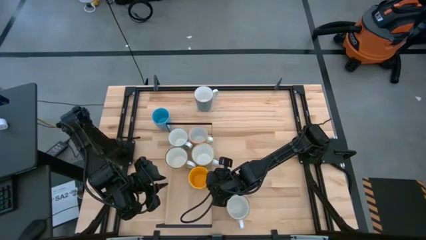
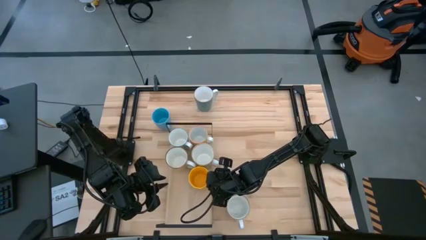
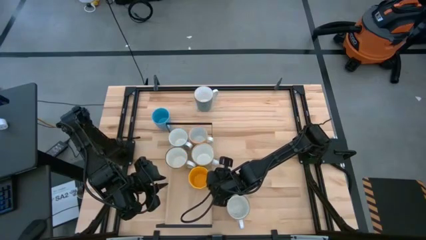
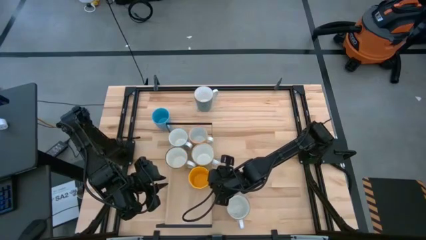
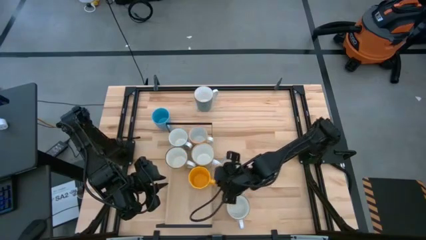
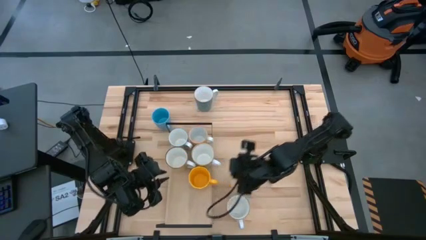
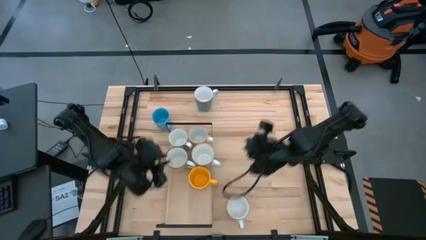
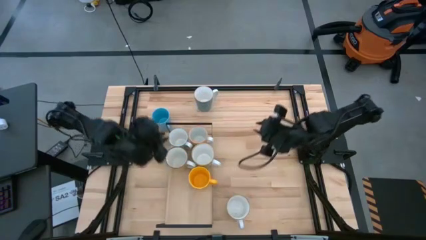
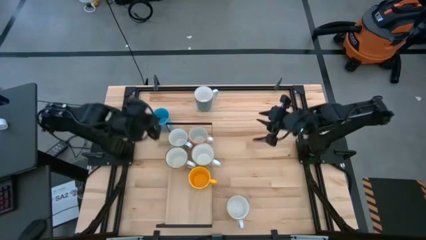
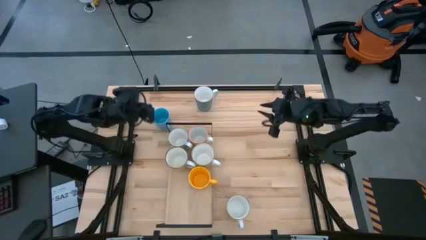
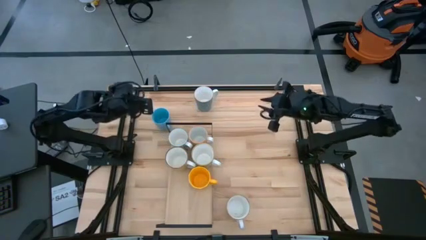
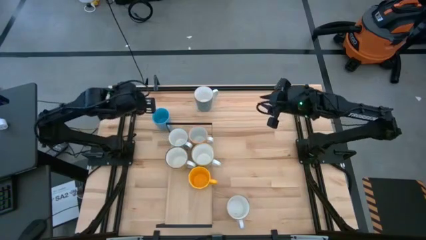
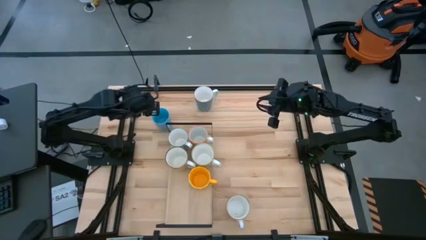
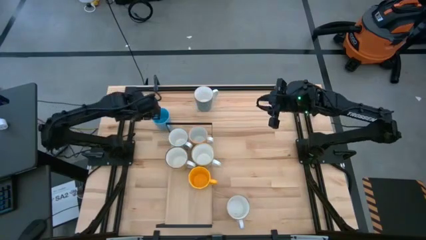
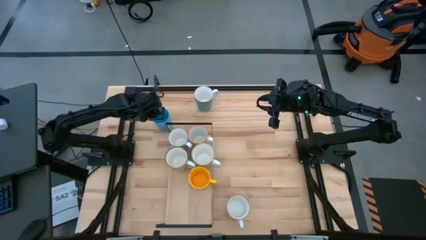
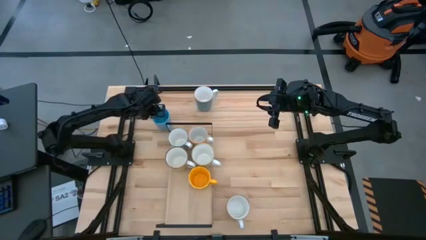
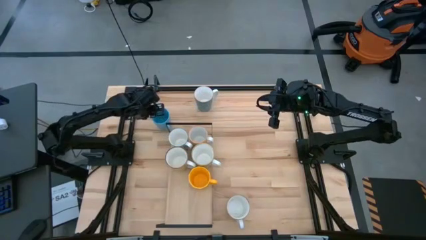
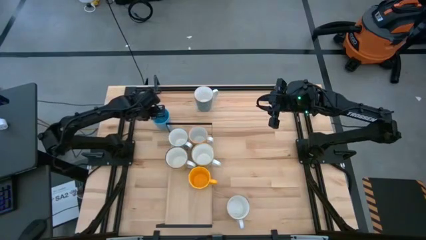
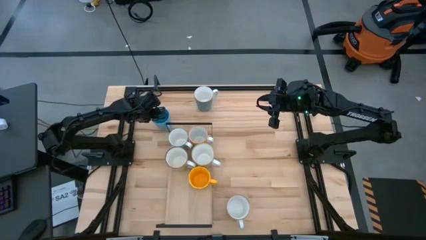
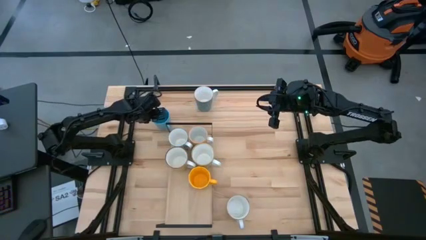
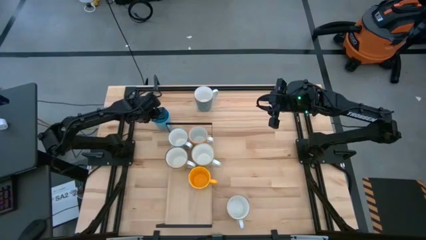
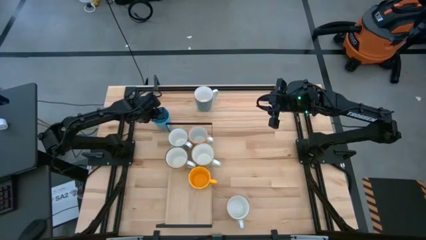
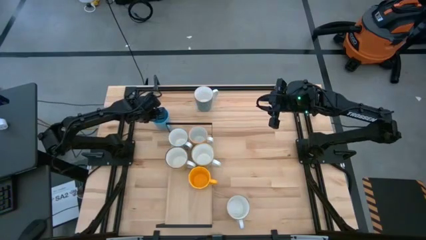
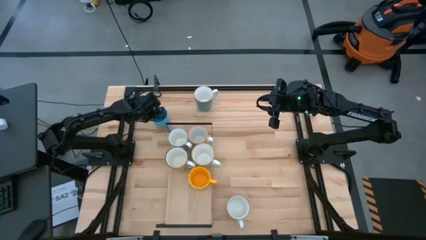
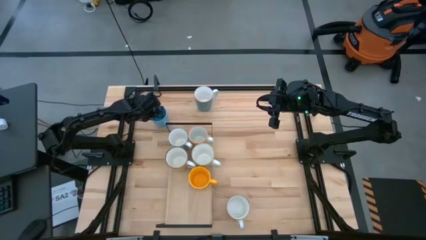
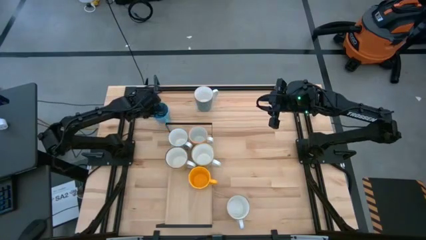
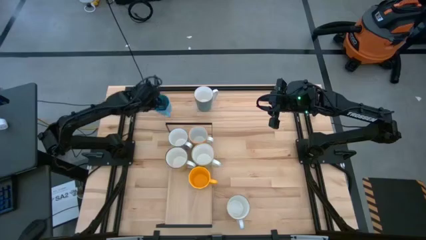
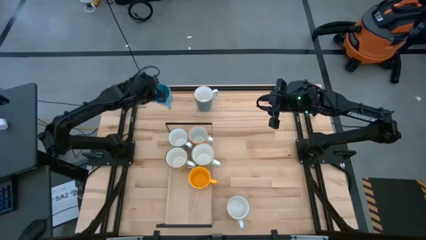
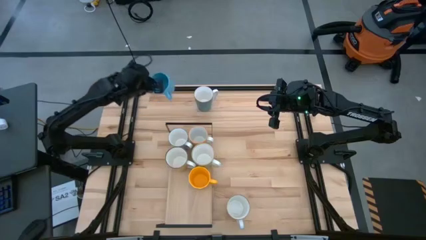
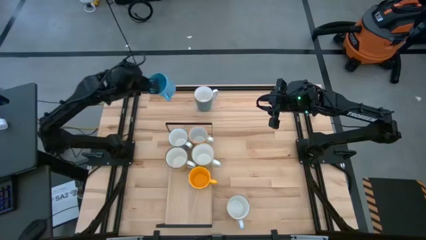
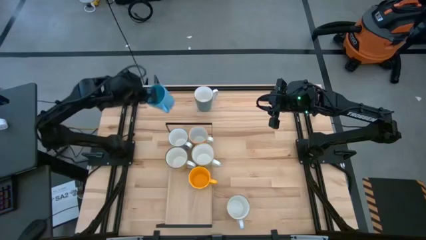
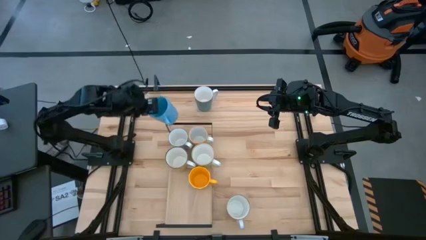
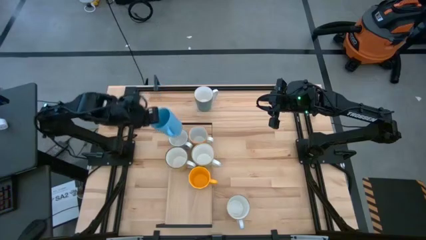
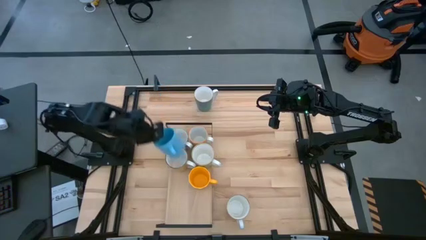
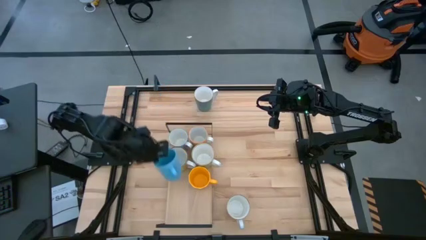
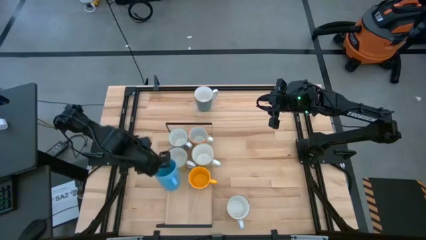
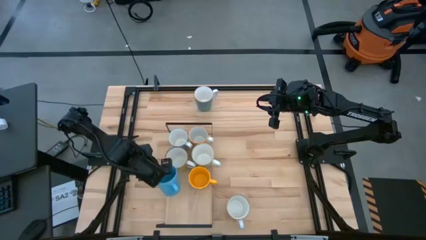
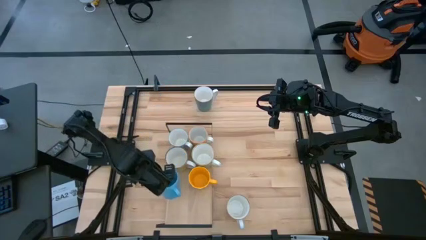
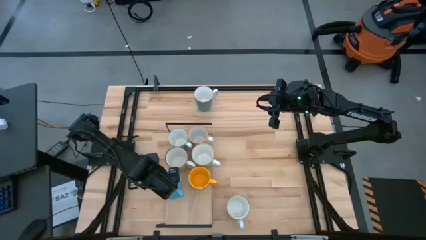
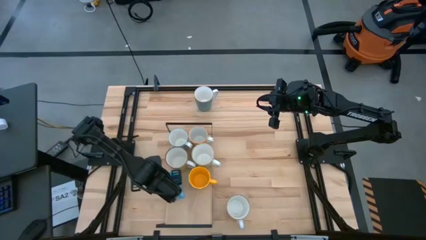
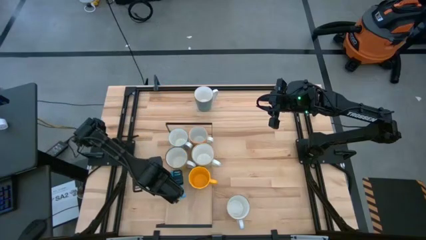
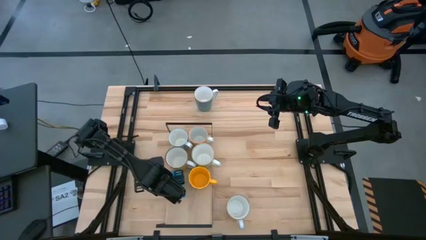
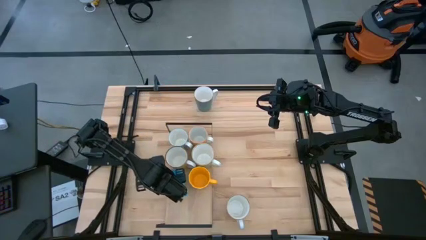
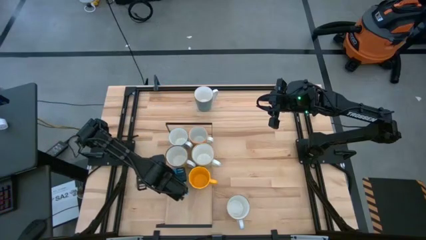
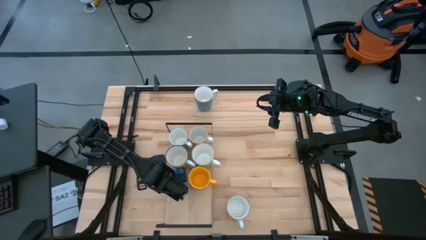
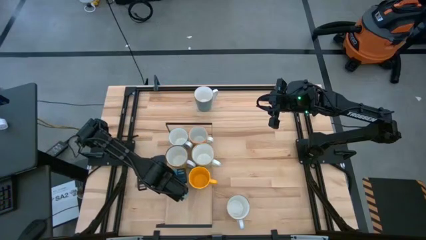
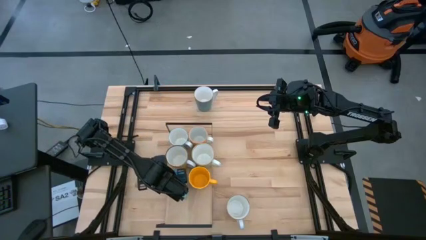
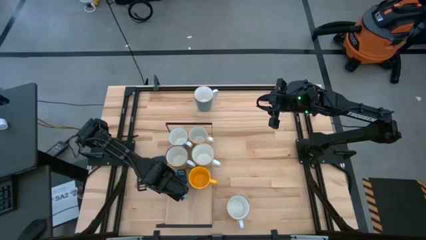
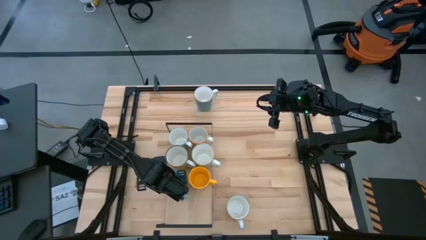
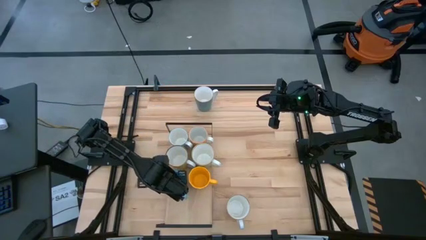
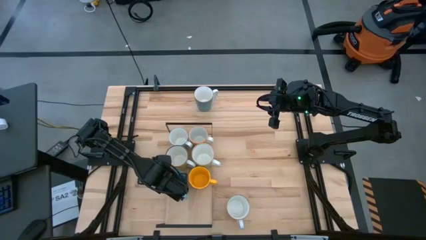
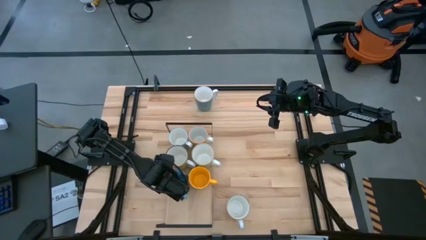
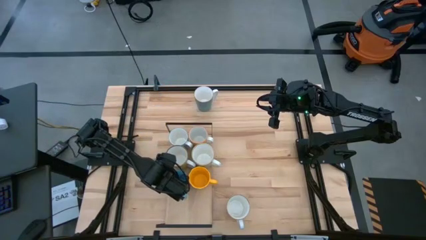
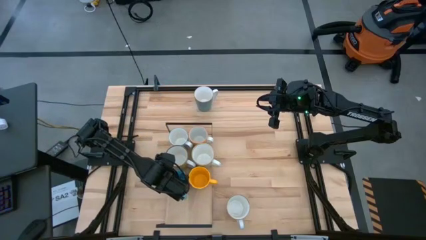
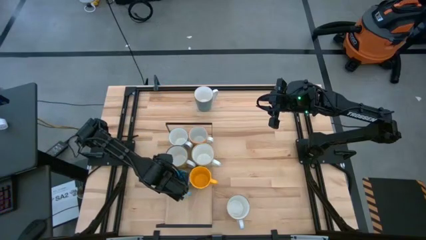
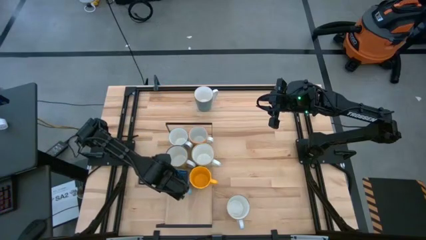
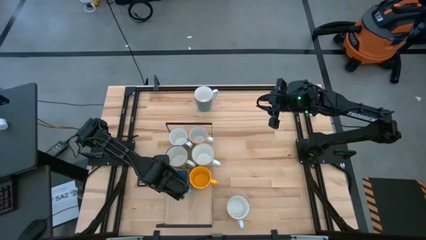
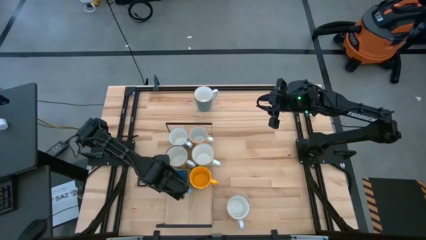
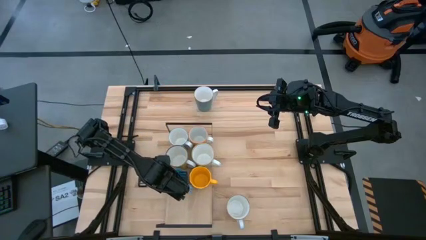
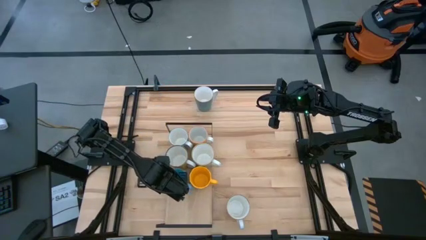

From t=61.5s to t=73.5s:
Task: Place coffee mugs
Put the blue mug on the shelf

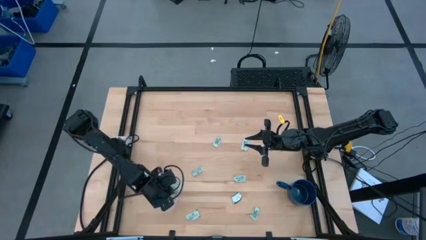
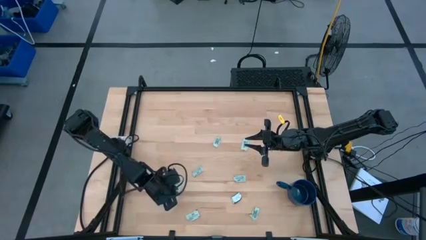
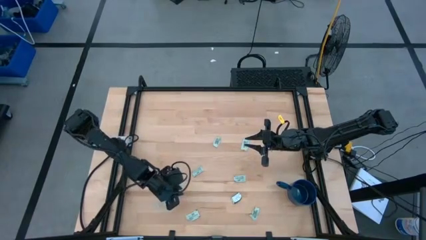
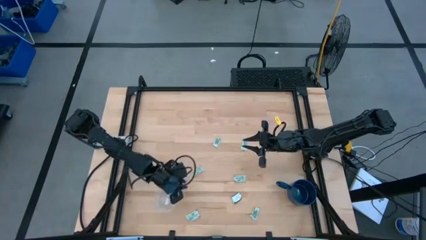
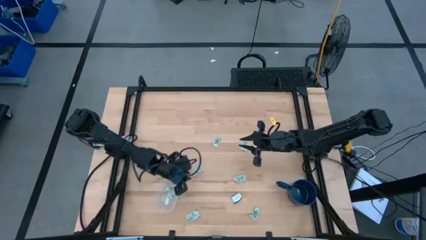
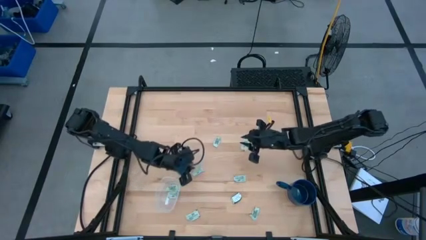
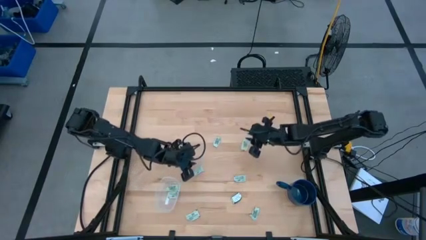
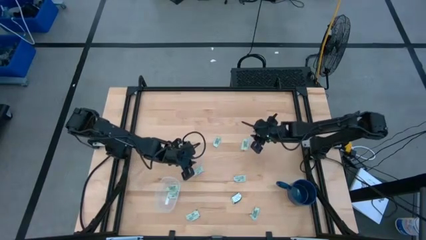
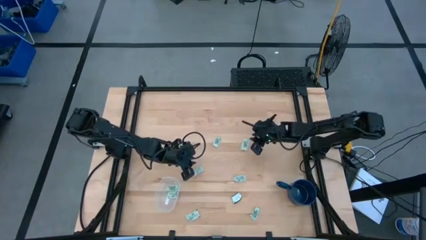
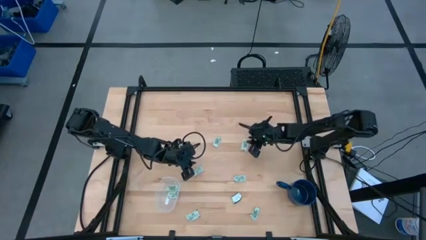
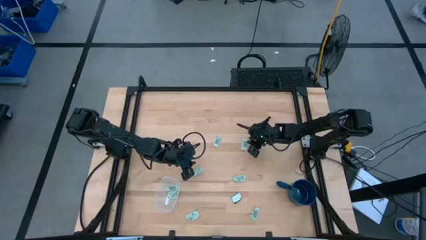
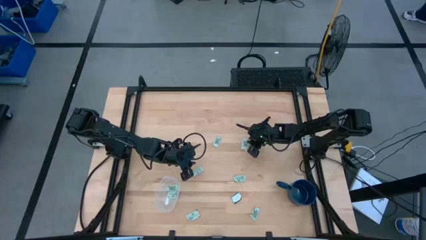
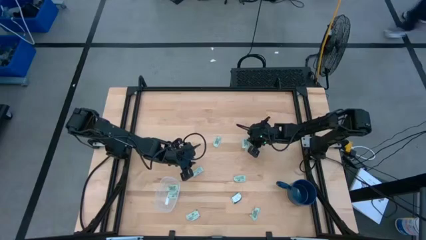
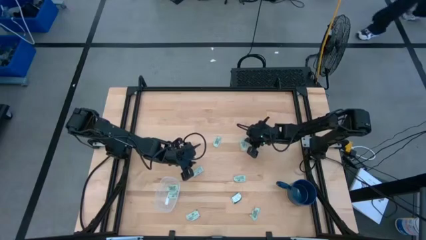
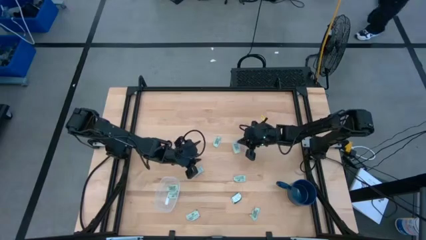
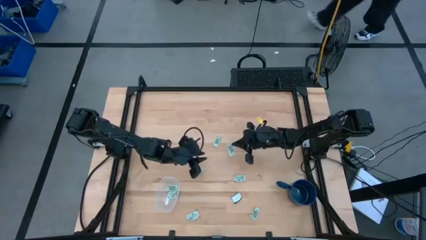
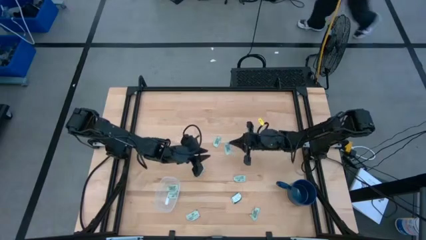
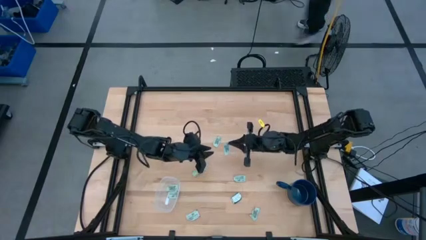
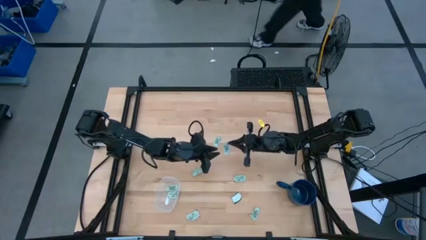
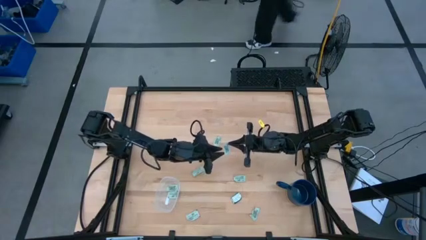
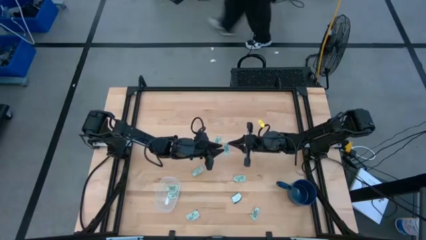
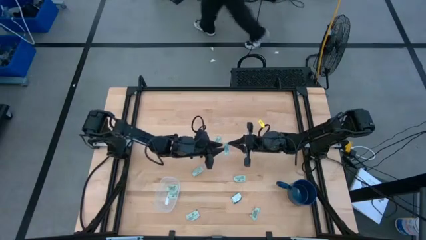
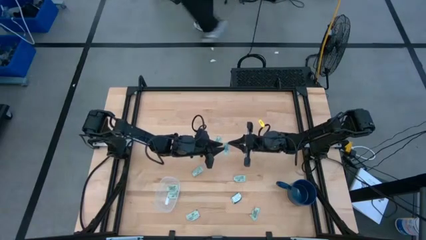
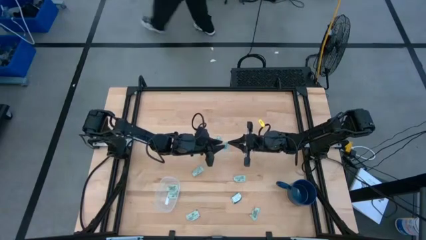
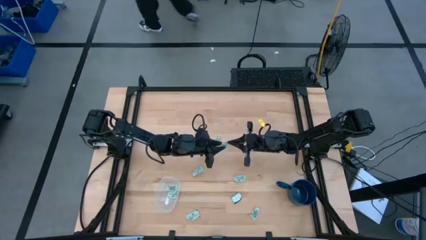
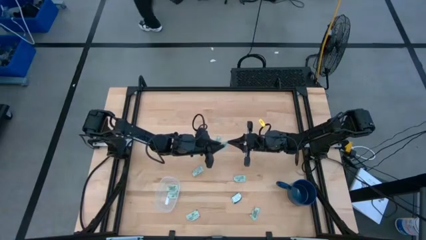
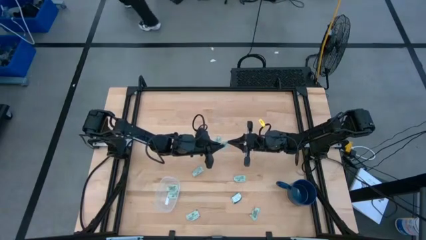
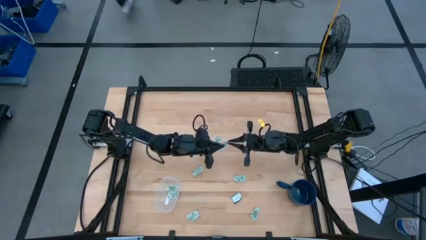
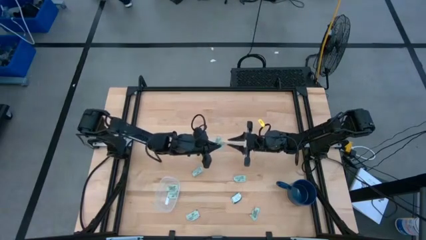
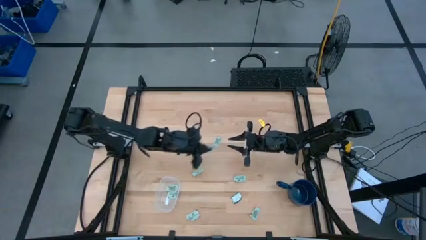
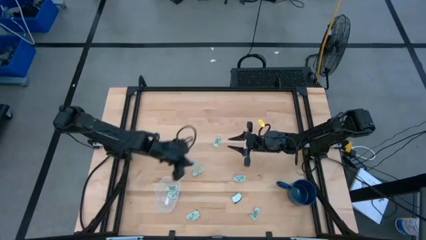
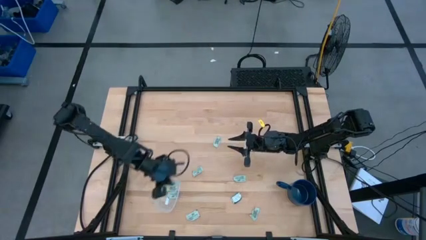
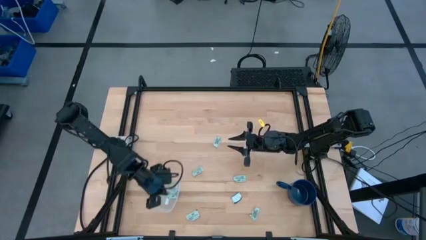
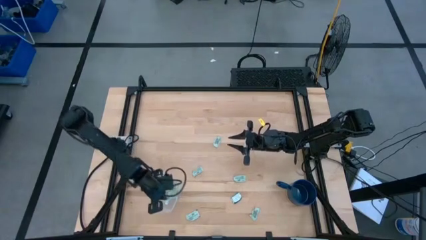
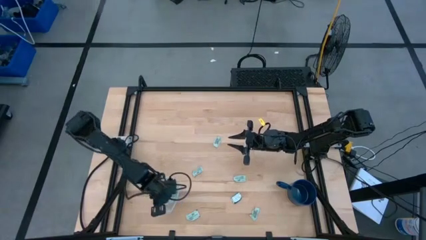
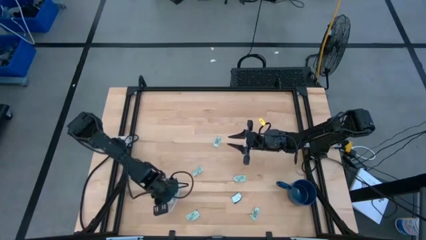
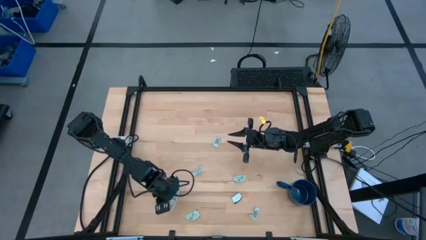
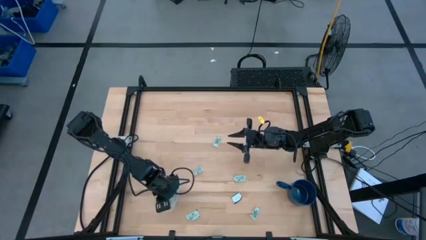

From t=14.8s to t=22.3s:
Task: Pick and place Stevia / Truvia into bins
Put the stevia packet into the transparent container
